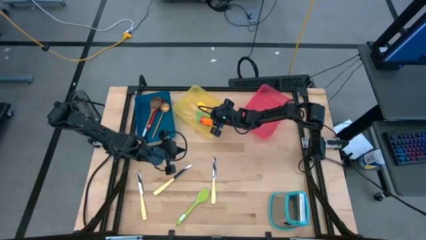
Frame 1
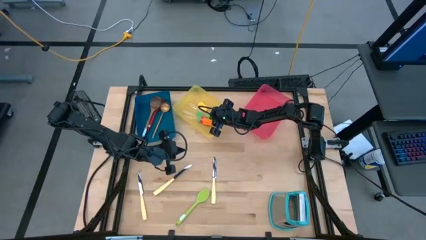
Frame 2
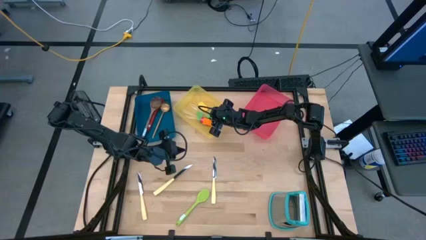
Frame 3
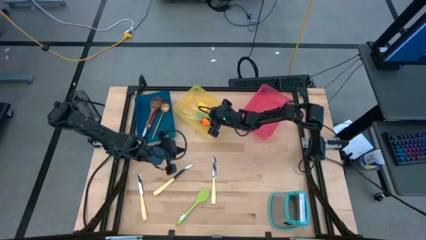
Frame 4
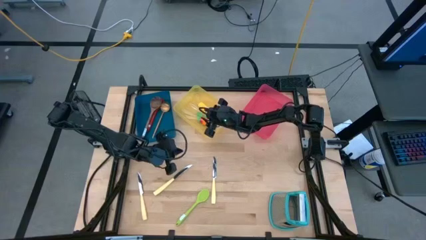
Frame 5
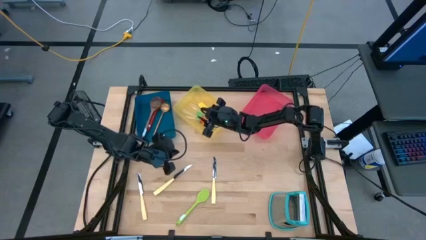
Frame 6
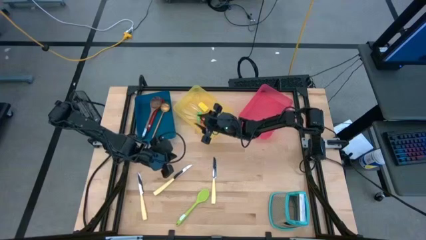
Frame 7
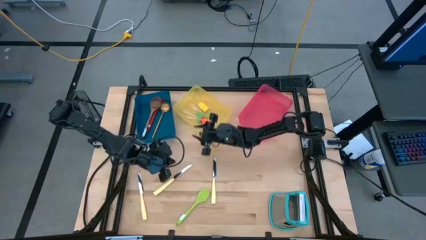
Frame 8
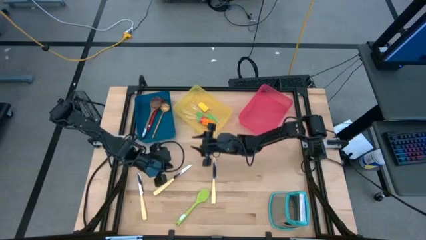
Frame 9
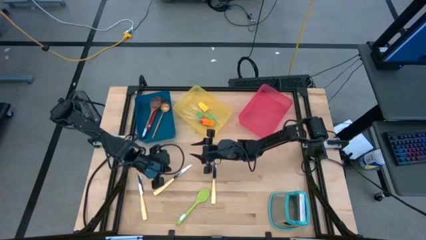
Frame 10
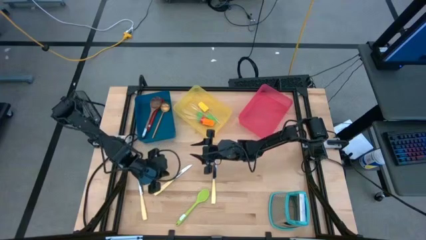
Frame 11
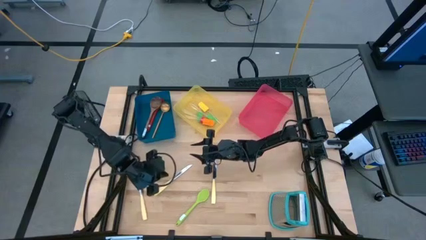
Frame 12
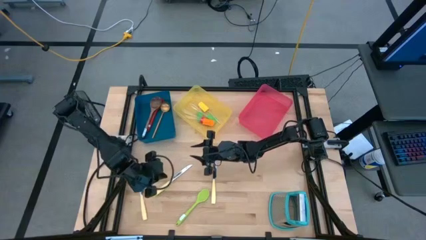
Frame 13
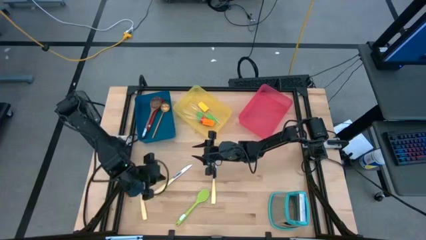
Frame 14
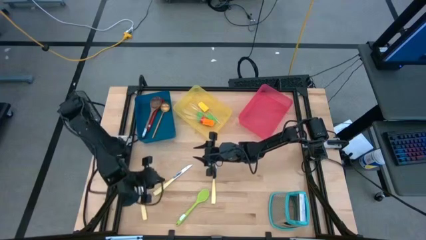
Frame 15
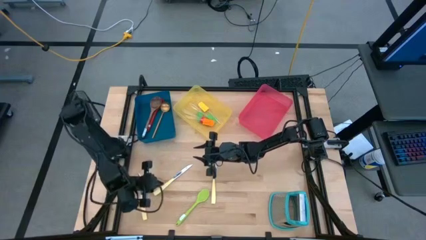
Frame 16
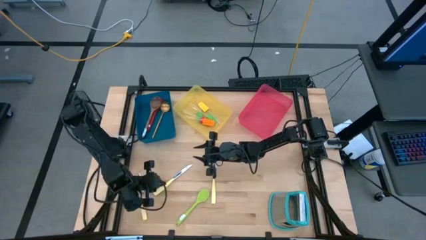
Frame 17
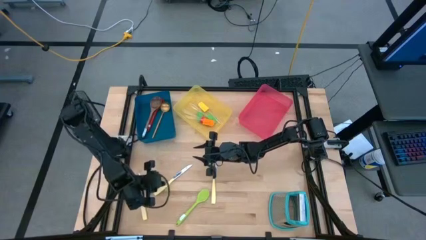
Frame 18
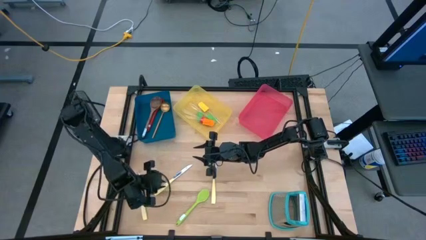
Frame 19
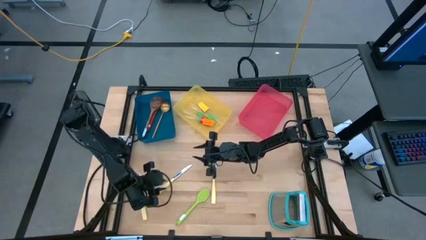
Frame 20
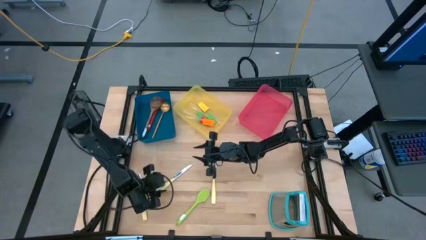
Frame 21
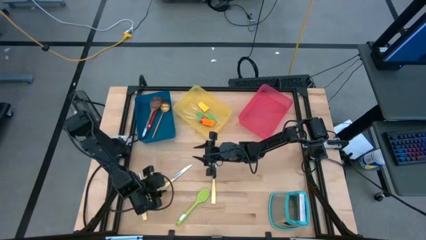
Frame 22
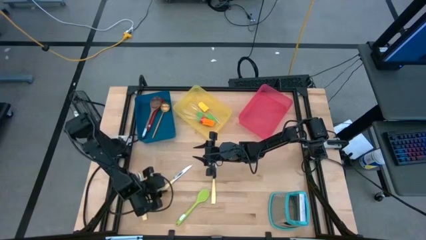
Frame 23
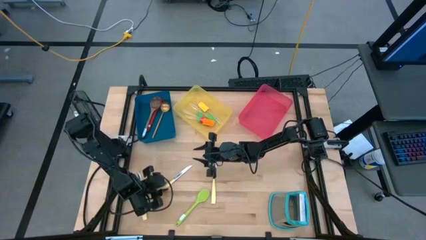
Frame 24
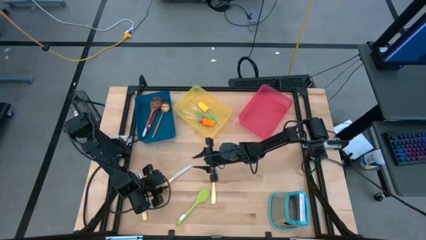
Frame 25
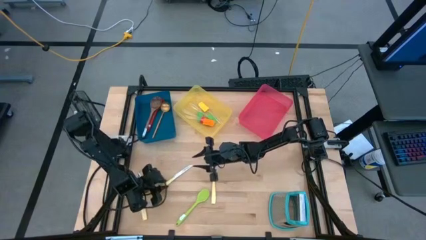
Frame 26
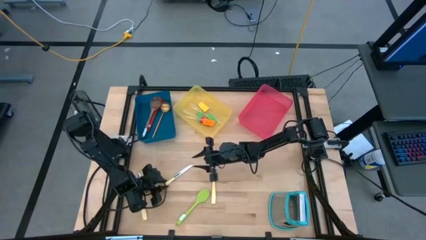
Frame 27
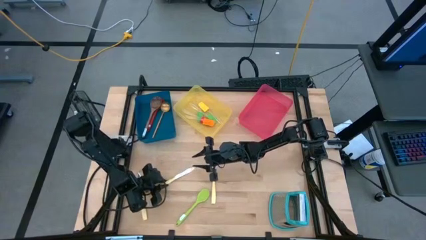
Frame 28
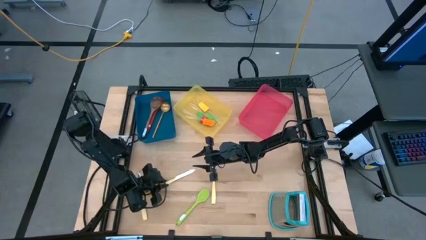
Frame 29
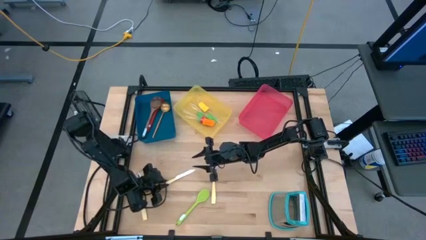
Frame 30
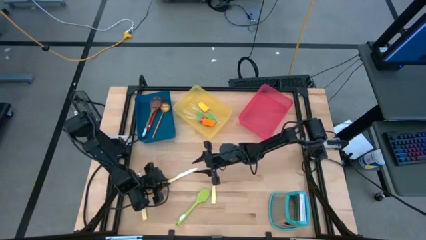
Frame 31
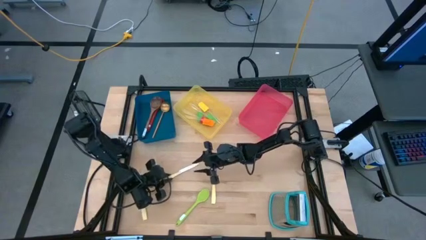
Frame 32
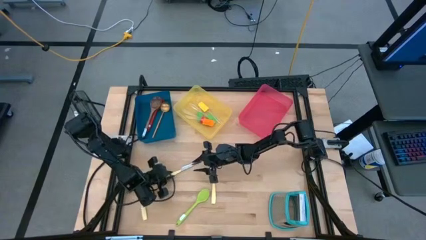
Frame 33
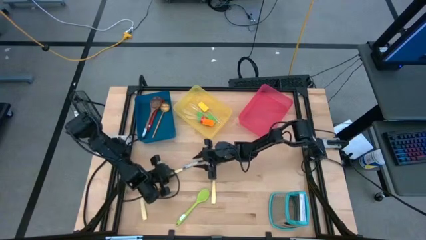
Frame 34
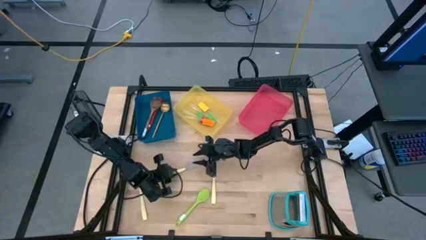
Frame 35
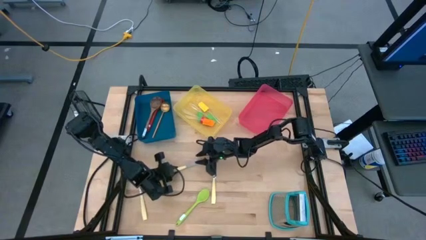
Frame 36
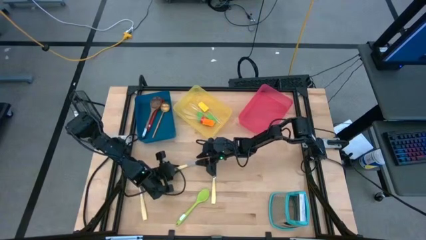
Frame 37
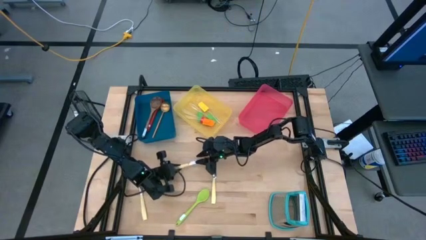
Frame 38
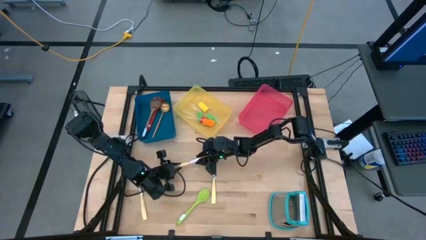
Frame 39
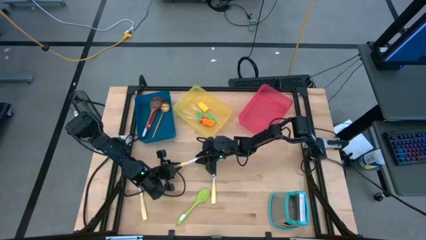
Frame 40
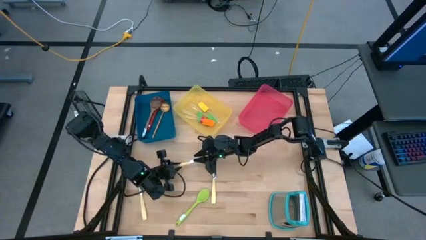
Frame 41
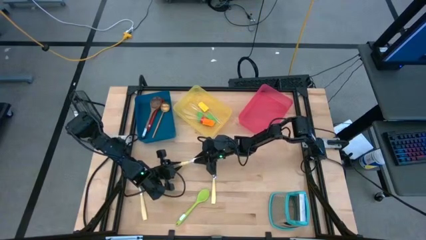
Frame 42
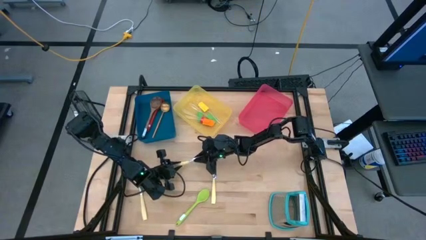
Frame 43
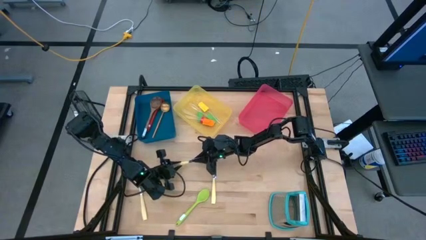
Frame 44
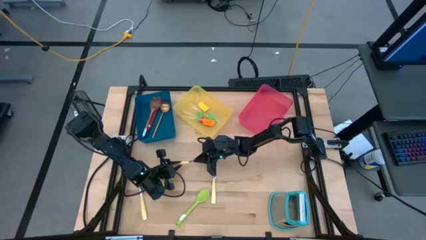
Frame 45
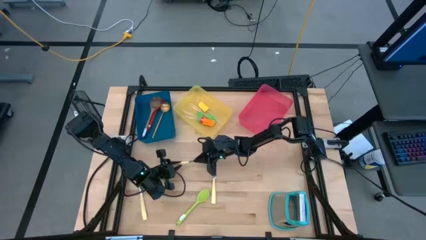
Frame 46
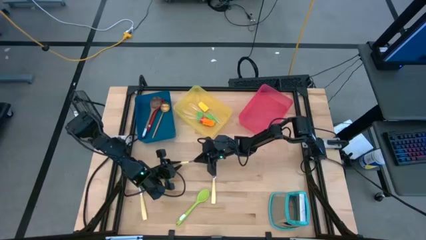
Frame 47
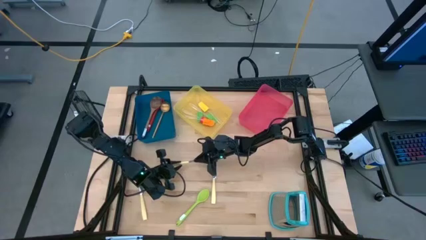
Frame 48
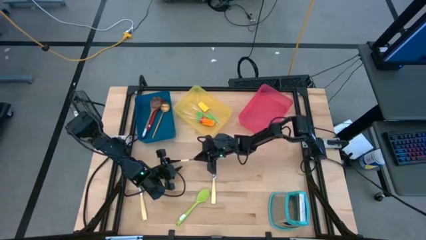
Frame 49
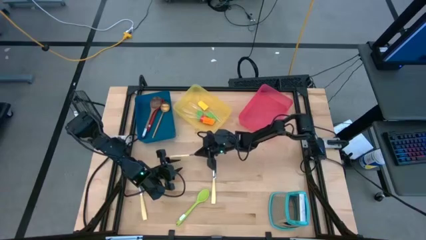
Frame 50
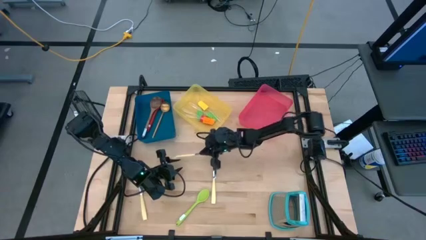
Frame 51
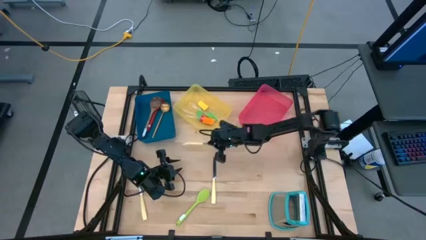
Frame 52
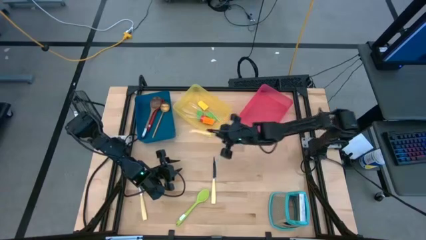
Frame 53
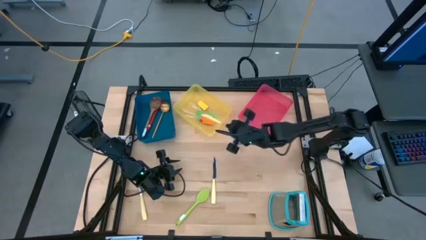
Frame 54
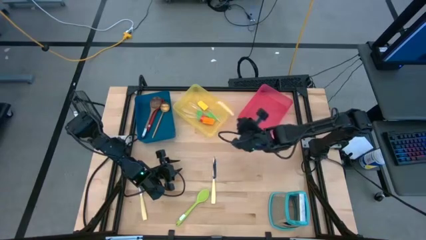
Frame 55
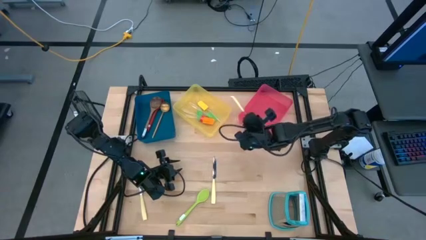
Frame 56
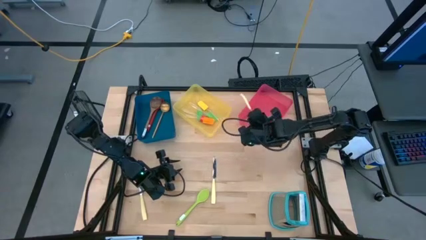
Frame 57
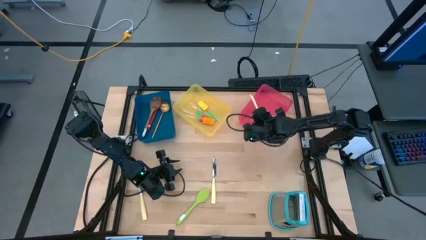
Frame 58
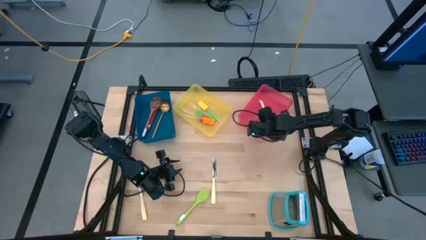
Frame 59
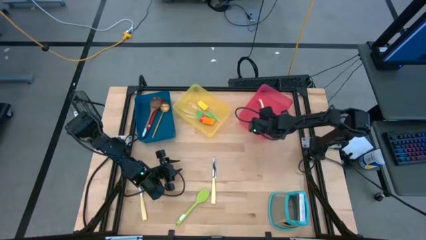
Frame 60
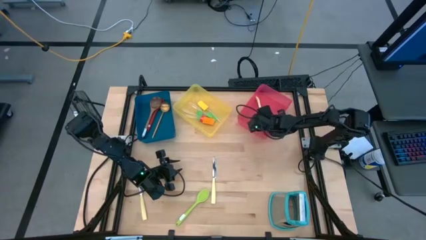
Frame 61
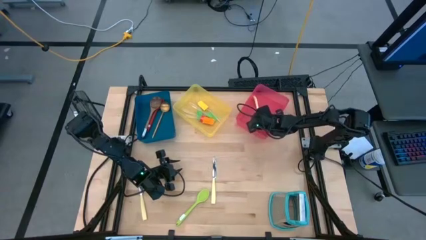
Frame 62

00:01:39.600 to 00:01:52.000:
Task: Pick & Place Kitchen Items
Put the middle yellow table knife into the red bin
